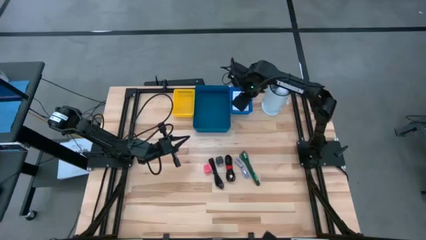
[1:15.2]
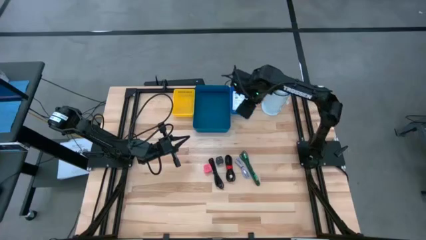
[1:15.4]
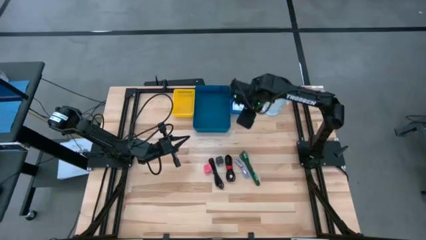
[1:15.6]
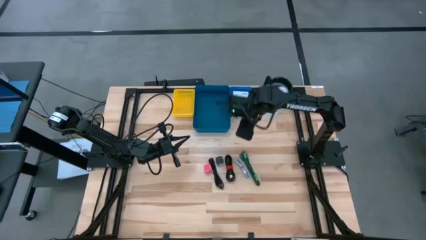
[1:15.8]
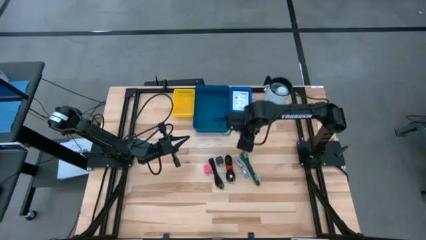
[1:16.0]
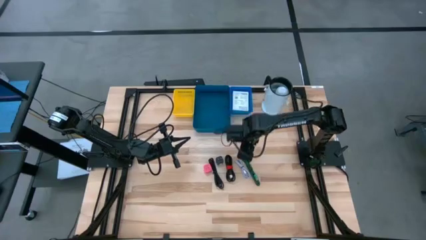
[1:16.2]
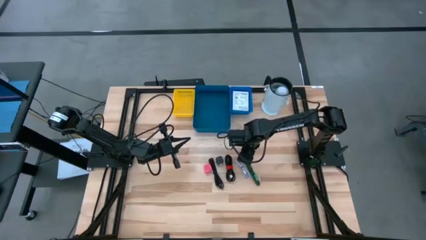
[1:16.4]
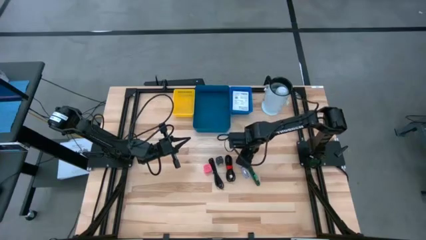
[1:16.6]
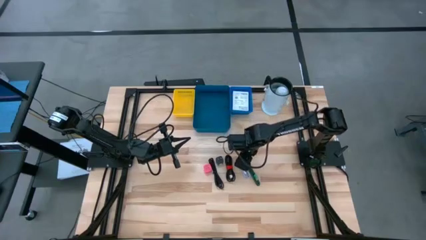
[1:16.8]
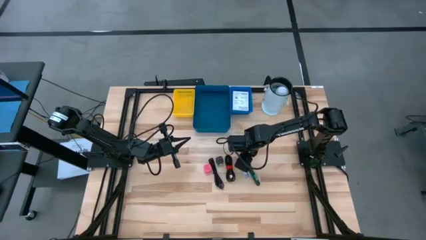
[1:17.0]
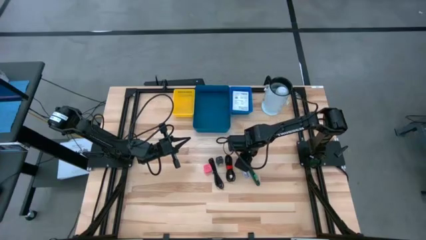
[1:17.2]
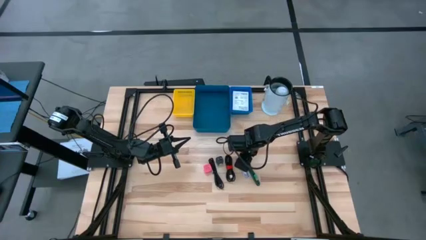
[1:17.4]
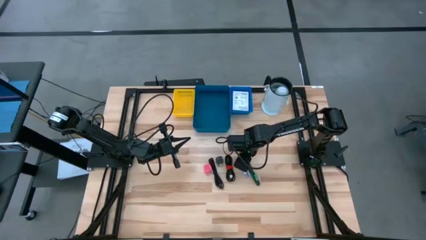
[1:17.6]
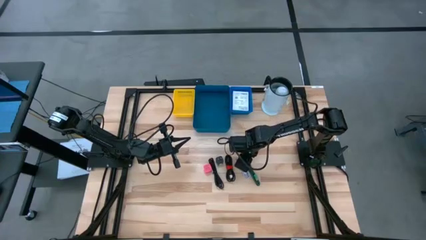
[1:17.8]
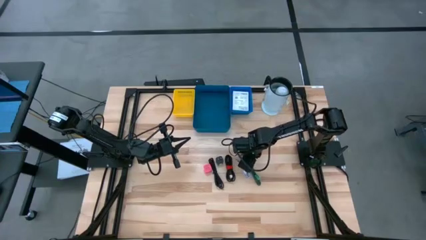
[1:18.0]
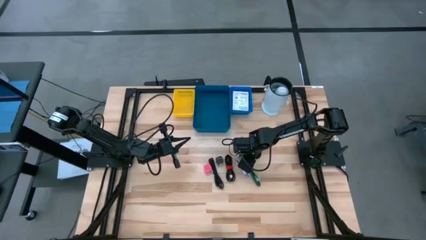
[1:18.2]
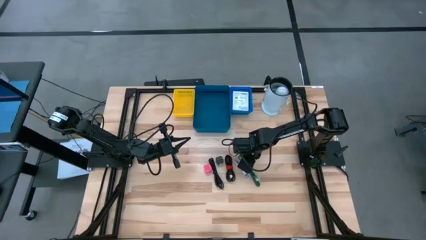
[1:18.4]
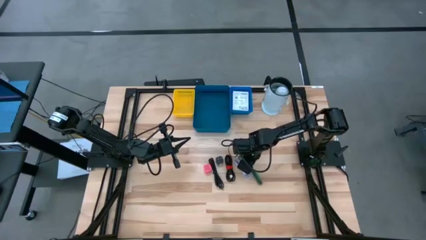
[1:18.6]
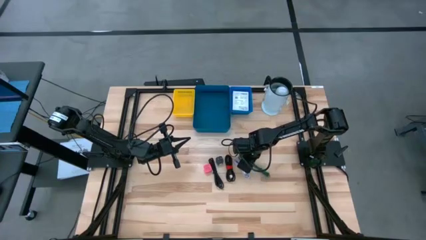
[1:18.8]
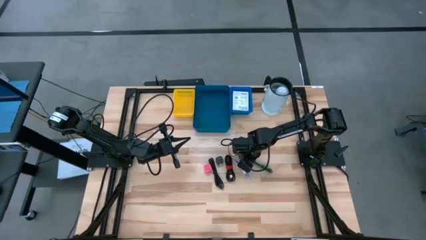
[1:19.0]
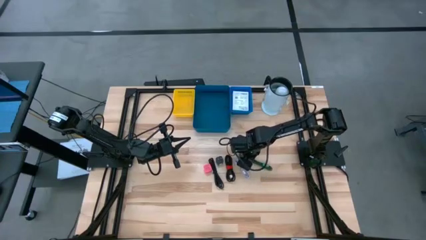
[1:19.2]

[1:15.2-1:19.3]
Task: Pick and place items into bin
Put the green charger cable into the dark blue bin

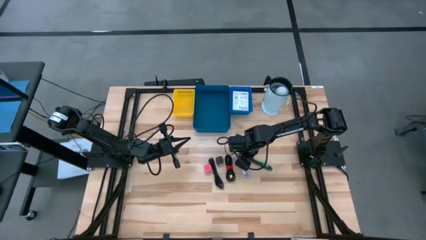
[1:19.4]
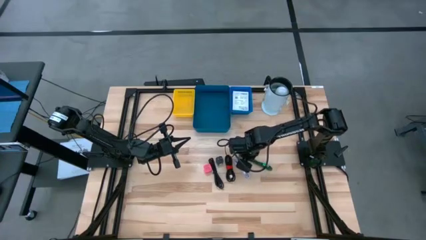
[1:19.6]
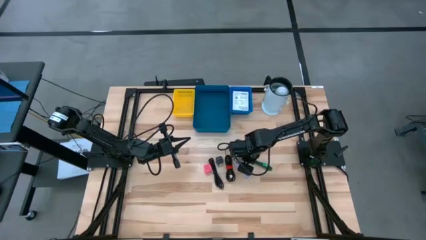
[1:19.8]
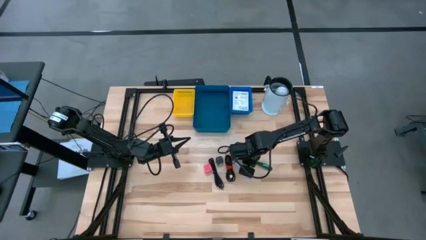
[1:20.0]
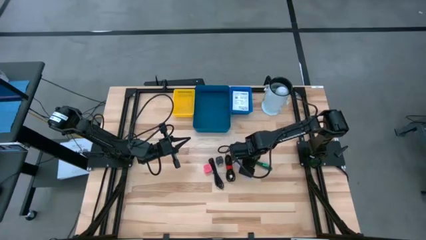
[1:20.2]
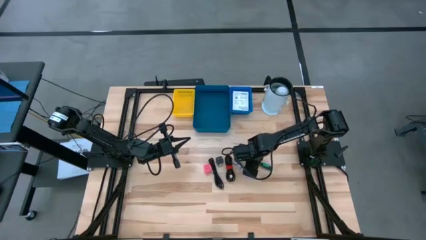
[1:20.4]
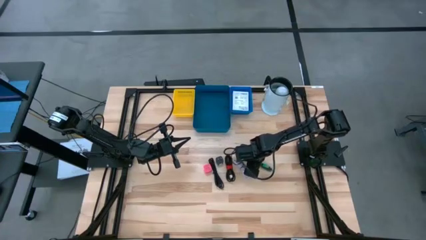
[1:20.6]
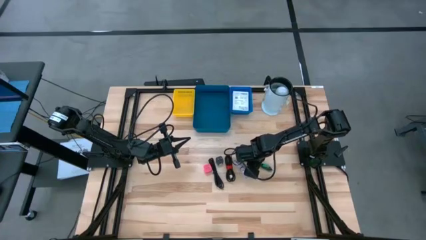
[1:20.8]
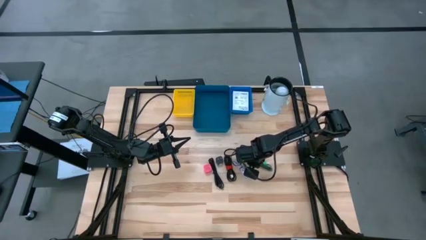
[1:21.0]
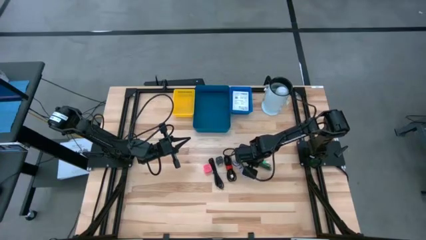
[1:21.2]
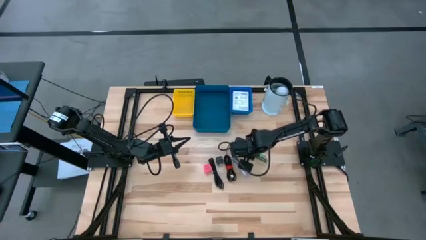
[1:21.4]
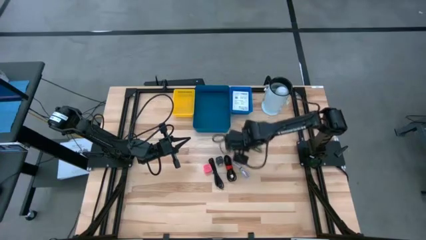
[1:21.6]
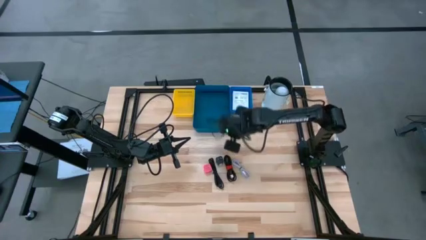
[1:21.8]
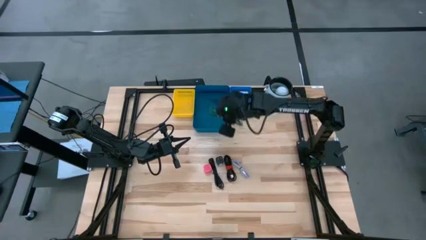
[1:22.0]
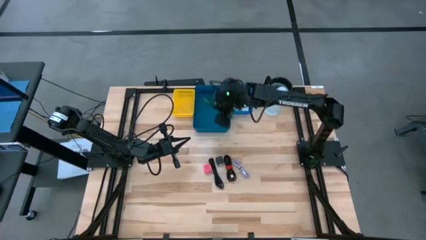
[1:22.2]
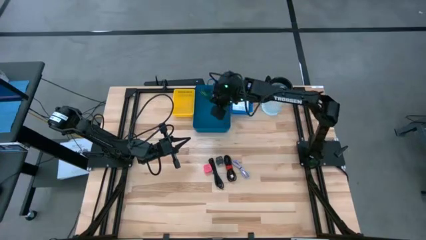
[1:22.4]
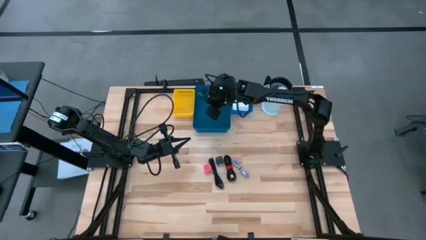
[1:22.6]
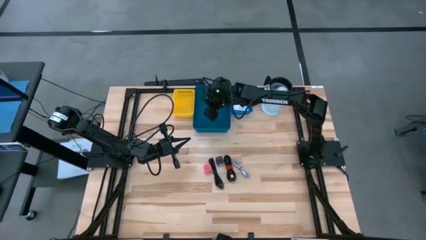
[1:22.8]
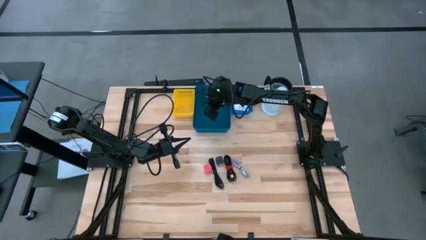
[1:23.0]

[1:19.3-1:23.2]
Put the green charger cable into the dark blue bin

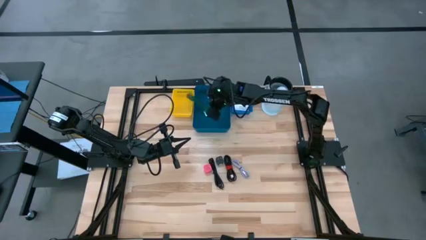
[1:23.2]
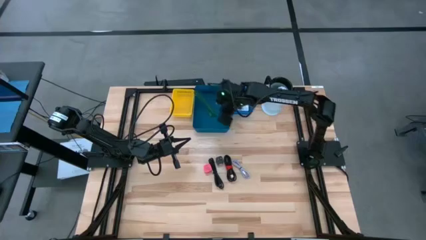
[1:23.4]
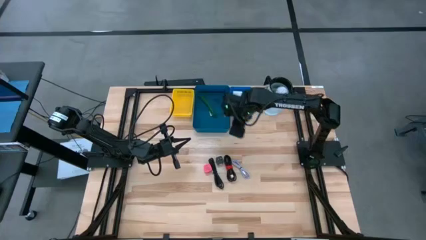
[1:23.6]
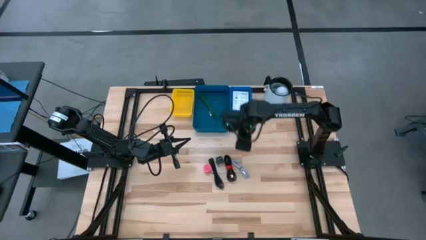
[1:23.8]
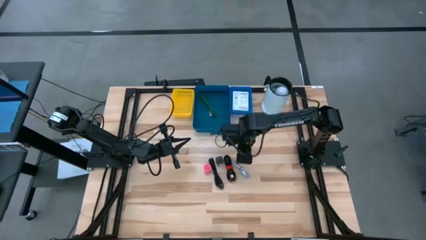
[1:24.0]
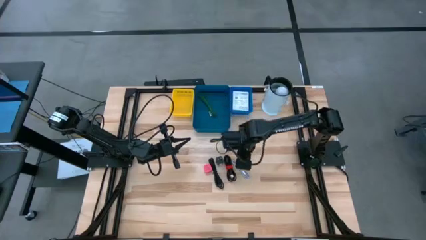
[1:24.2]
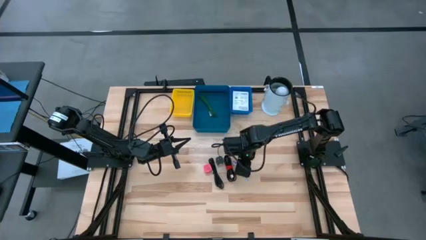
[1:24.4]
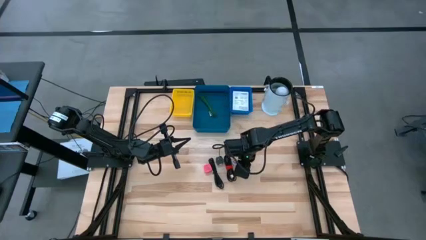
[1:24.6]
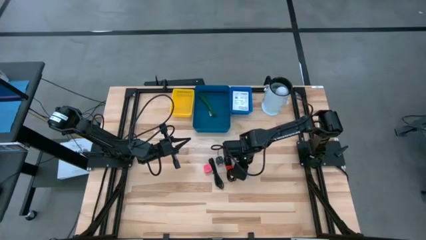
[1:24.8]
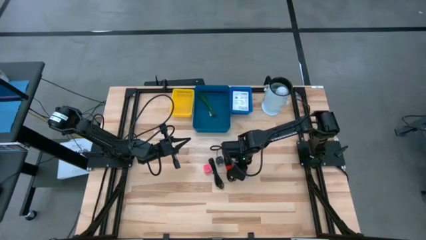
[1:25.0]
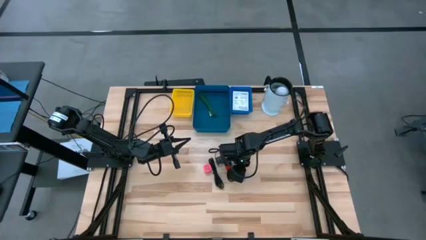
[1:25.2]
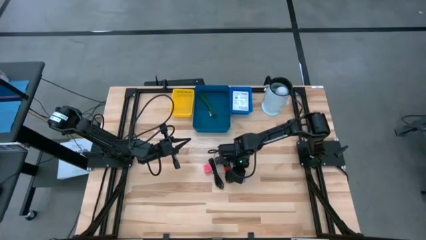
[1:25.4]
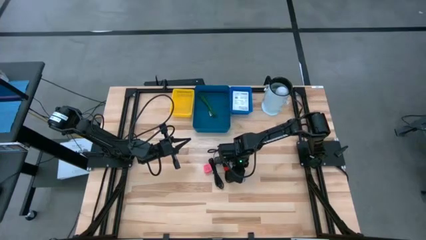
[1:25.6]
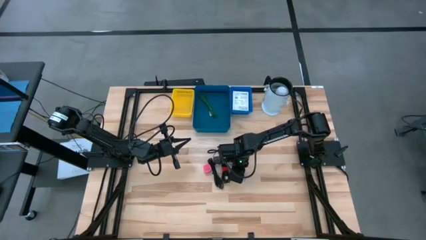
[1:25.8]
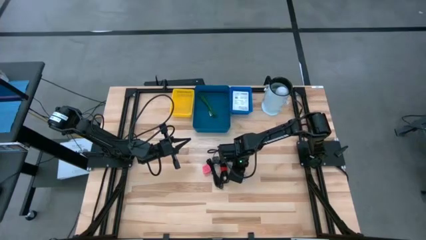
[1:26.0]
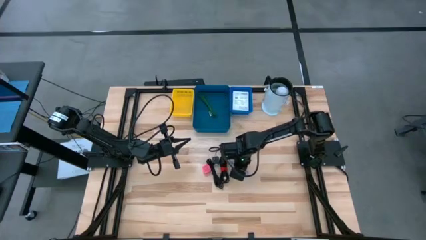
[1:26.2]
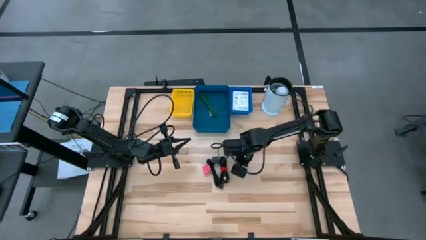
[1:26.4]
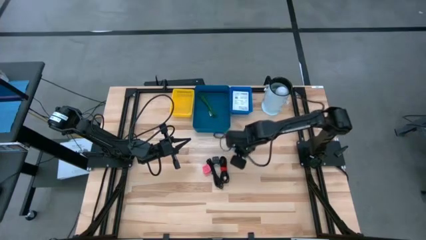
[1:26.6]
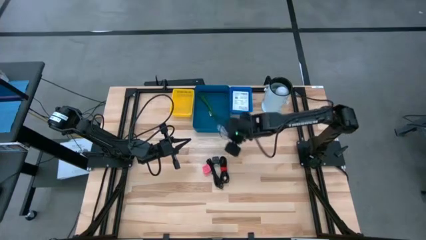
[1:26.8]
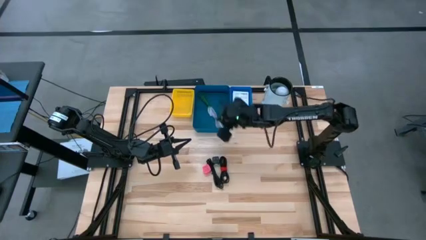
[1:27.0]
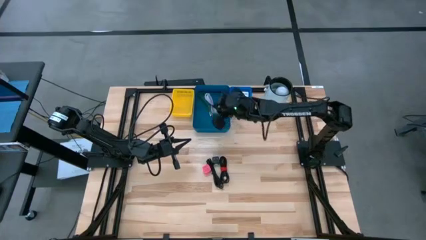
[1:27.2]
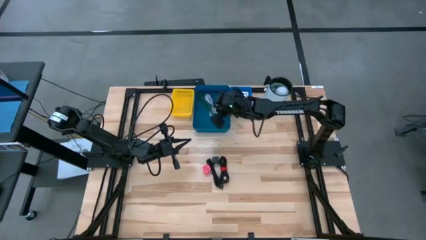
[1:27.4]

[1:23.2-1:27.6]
Put the white charger cable into the dark blue bin

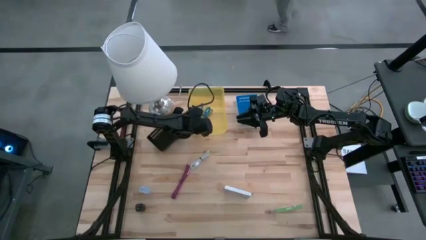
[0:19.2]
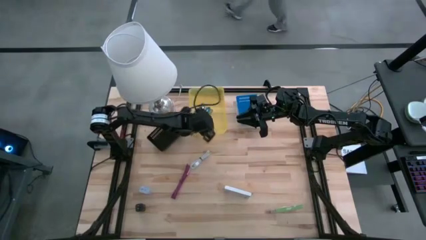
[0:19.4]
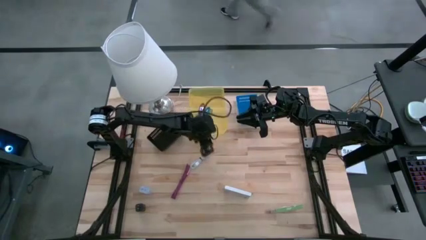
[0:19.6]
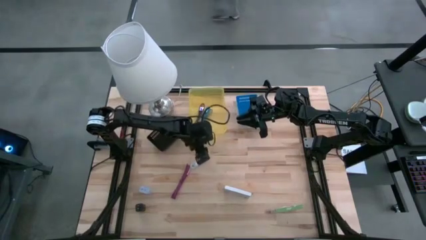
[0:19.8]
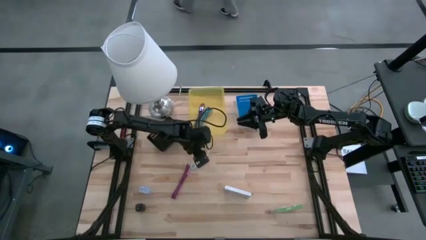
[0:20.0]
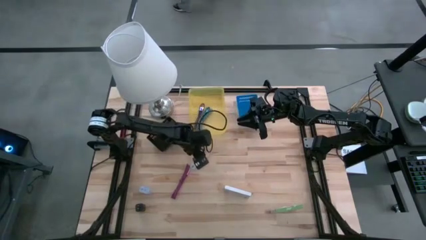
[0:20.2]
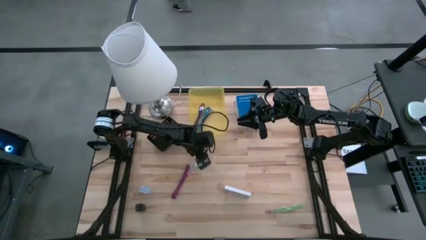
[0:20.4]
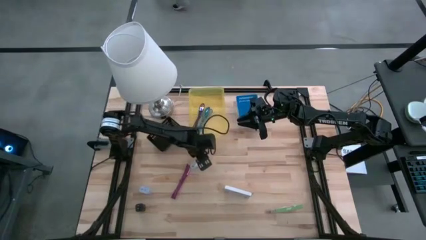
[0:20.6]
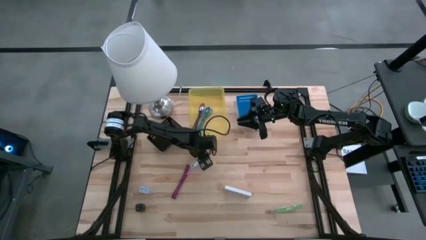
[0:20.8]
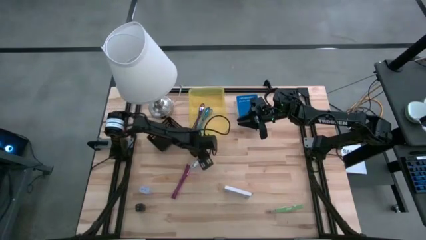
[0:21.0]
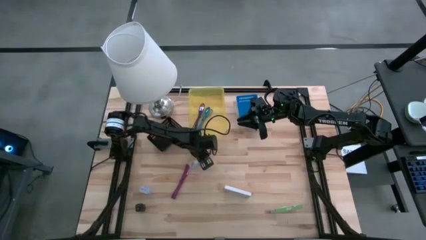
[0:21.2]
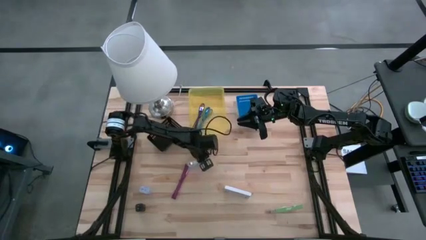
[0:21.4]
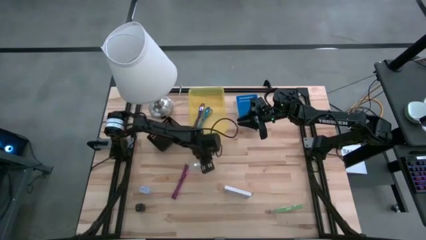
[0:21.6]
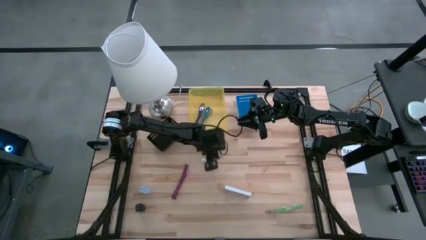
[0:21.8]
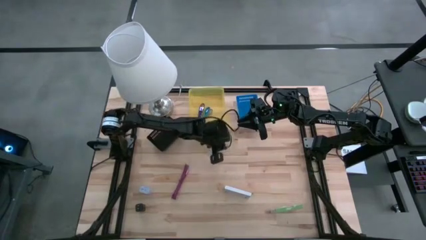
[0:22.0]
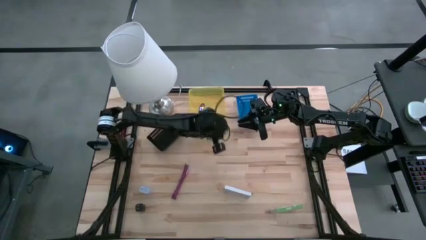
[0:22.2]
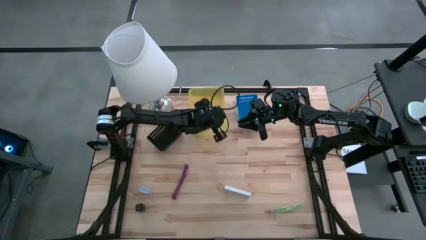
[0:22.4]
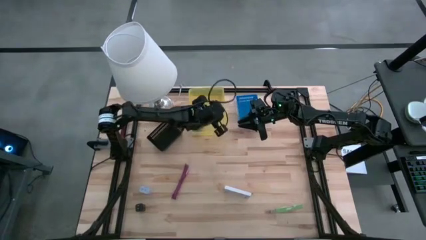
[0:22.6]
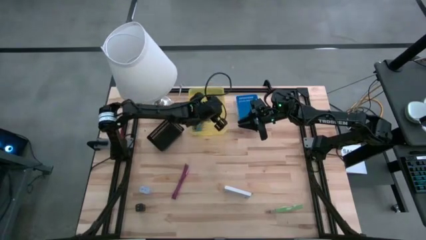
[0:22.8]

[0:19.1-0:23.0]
Task: Pick and place items into bin
Put the white charger cable into the yellow bin
